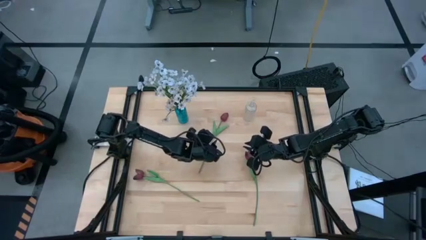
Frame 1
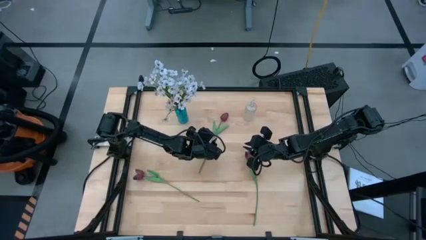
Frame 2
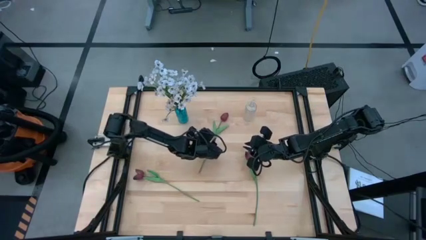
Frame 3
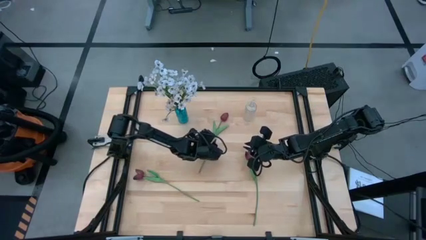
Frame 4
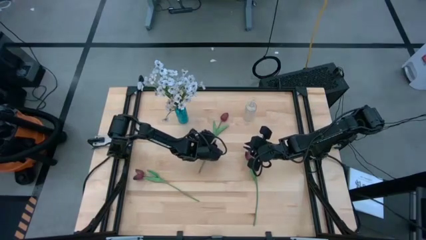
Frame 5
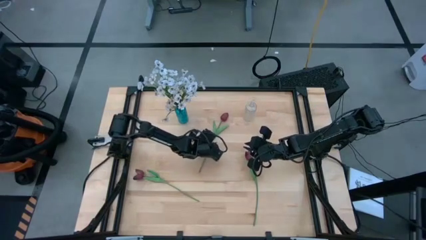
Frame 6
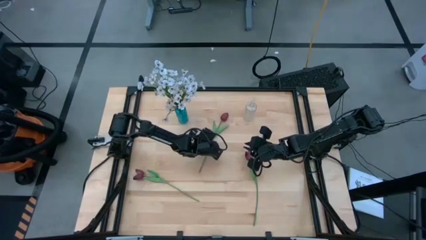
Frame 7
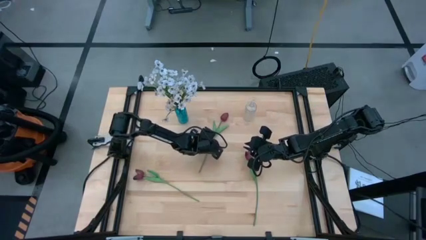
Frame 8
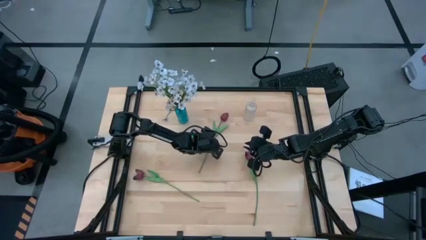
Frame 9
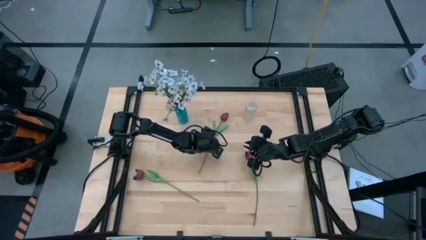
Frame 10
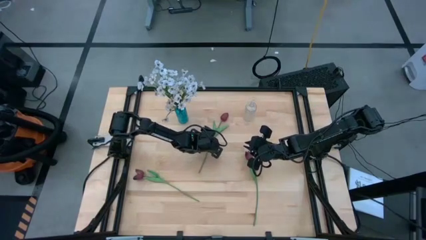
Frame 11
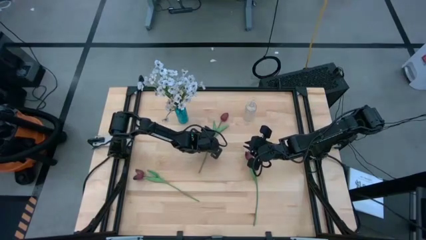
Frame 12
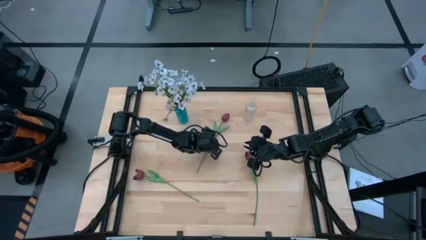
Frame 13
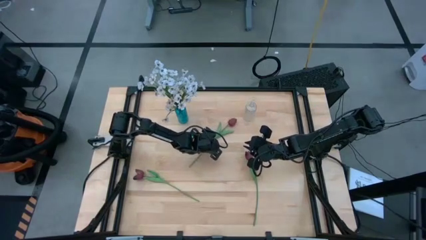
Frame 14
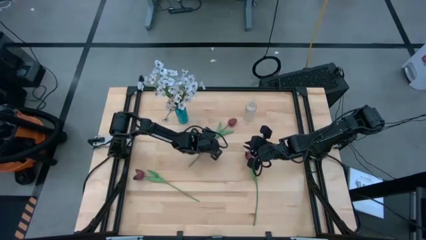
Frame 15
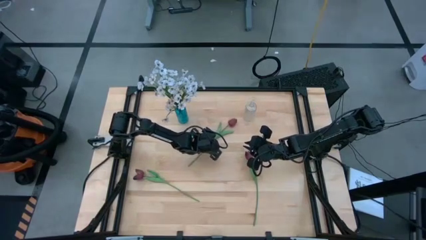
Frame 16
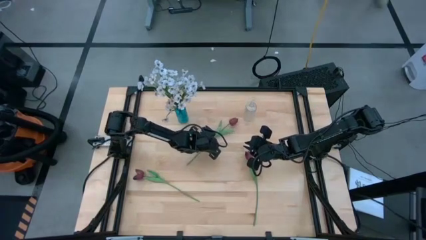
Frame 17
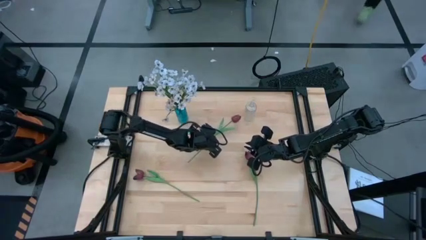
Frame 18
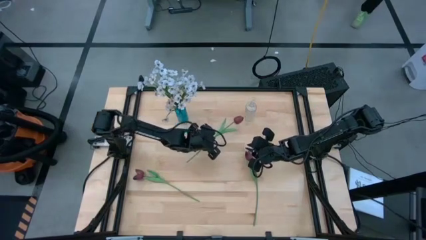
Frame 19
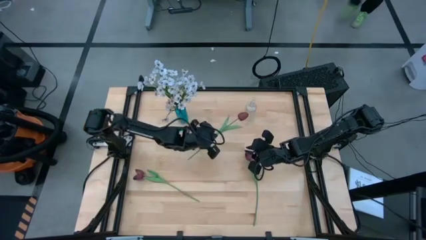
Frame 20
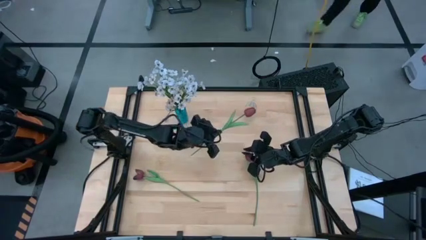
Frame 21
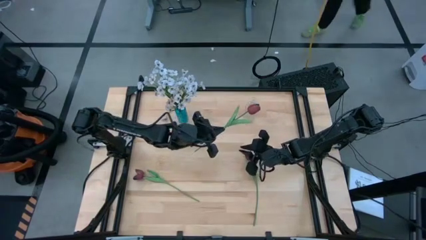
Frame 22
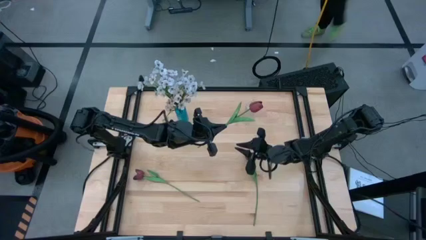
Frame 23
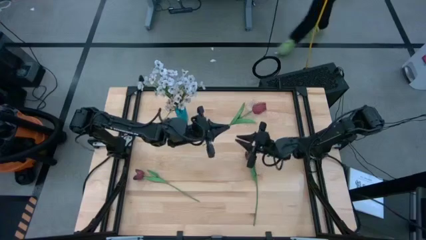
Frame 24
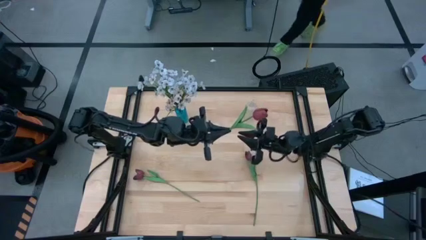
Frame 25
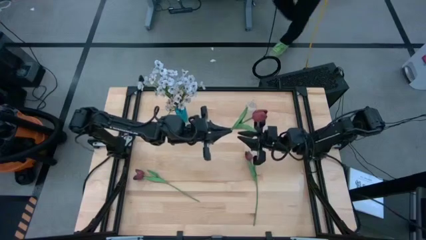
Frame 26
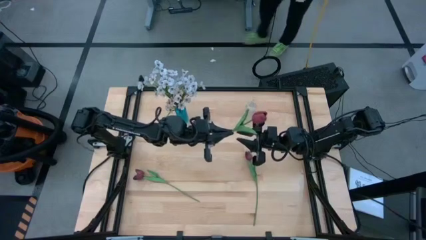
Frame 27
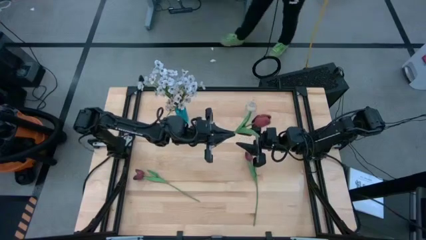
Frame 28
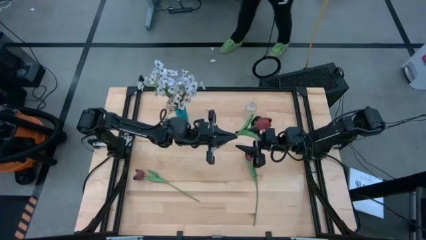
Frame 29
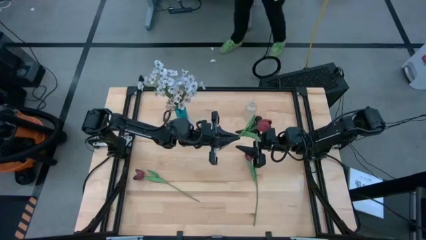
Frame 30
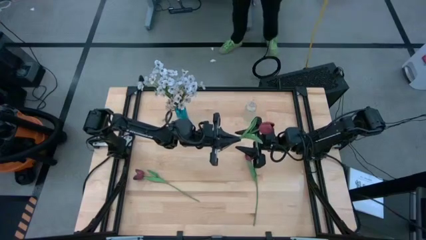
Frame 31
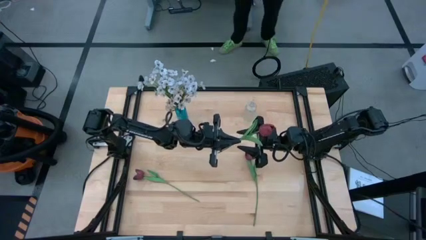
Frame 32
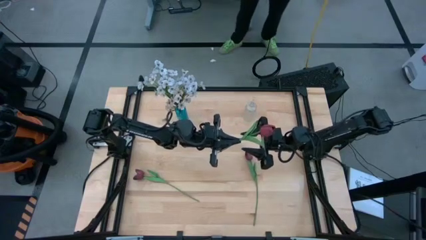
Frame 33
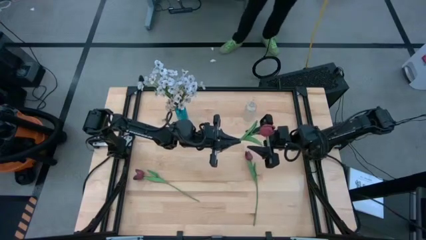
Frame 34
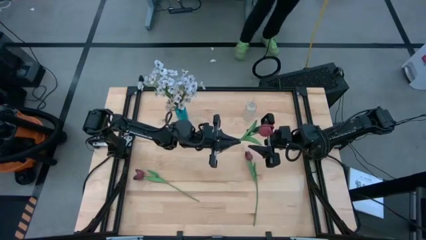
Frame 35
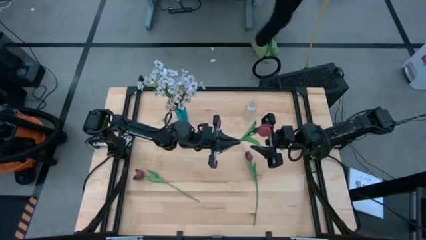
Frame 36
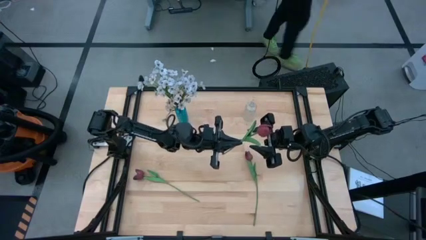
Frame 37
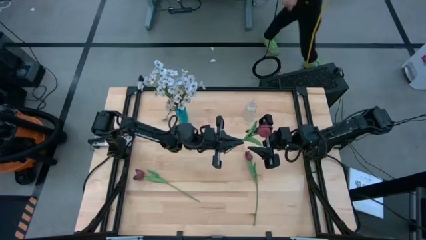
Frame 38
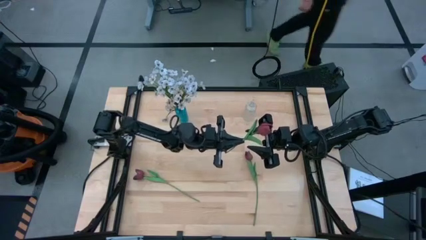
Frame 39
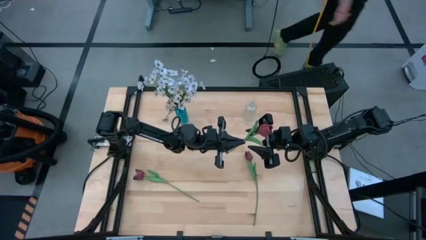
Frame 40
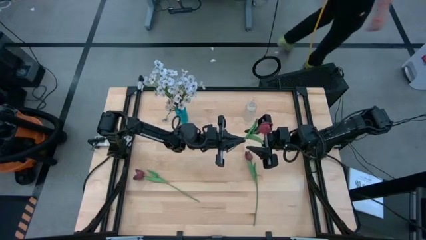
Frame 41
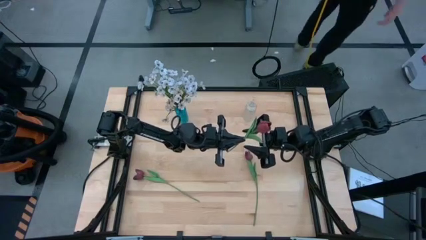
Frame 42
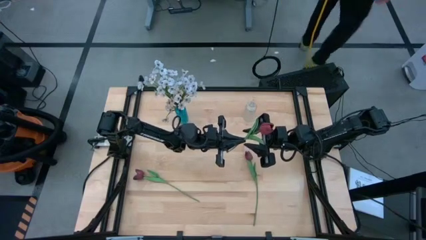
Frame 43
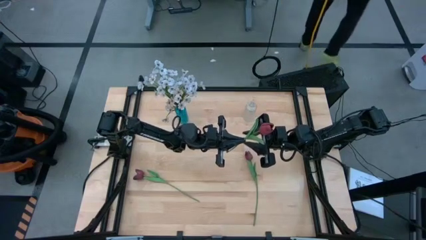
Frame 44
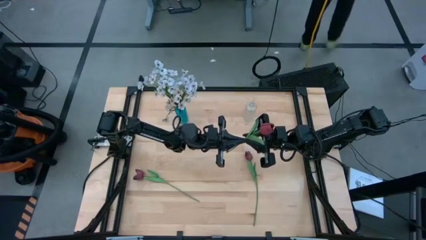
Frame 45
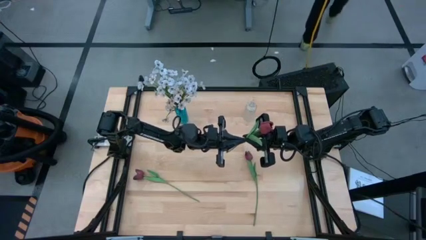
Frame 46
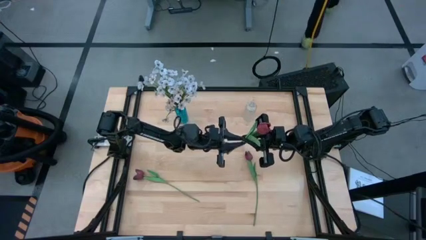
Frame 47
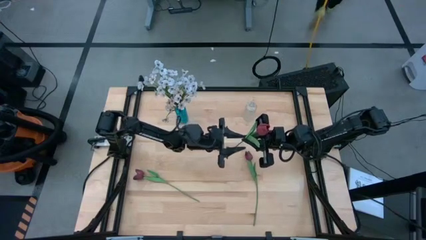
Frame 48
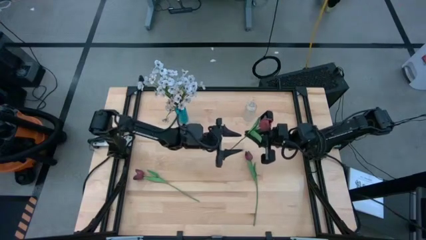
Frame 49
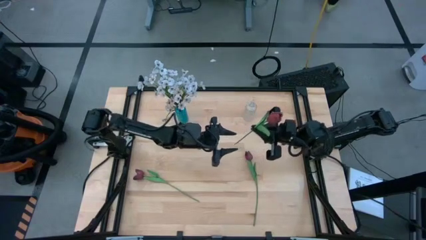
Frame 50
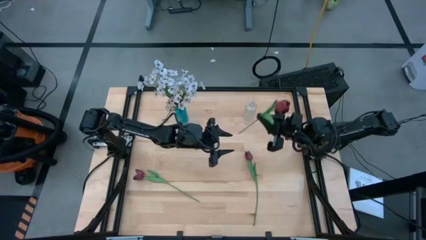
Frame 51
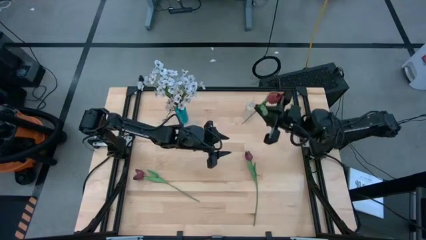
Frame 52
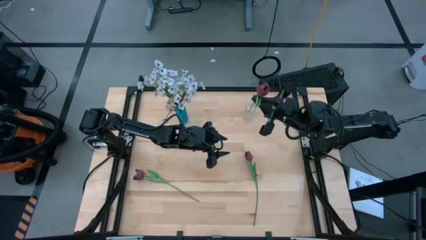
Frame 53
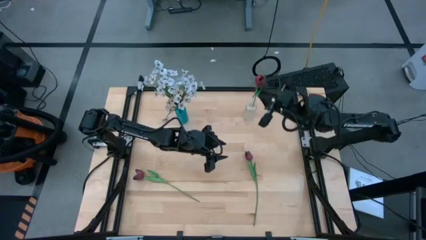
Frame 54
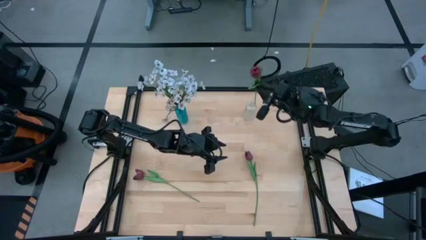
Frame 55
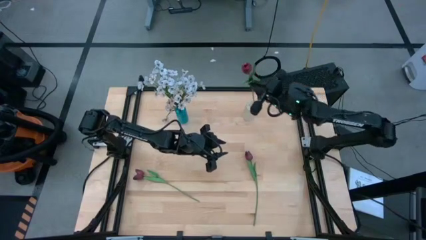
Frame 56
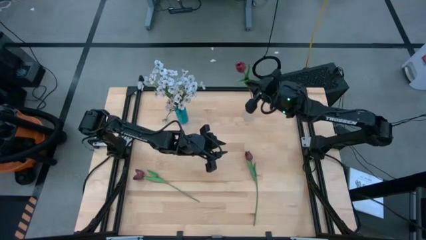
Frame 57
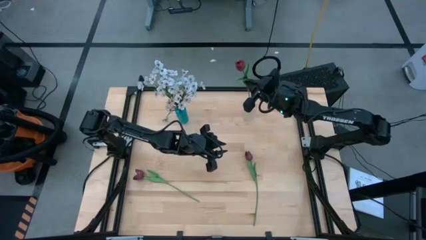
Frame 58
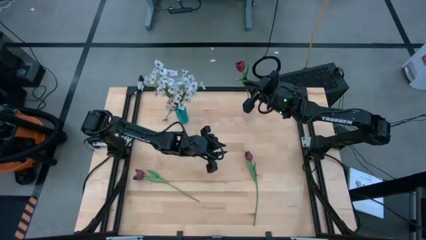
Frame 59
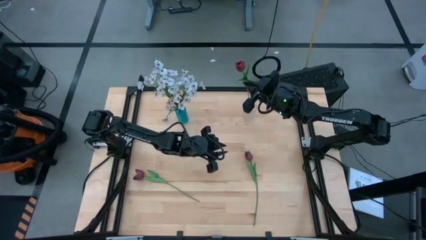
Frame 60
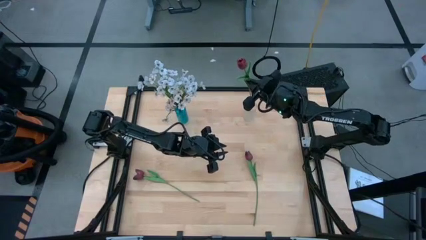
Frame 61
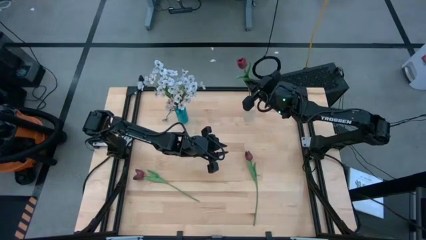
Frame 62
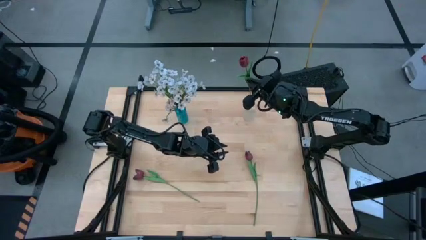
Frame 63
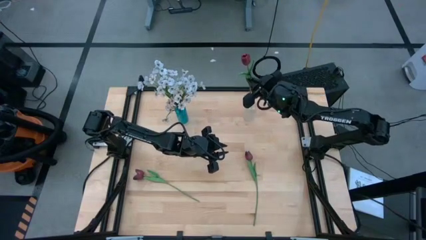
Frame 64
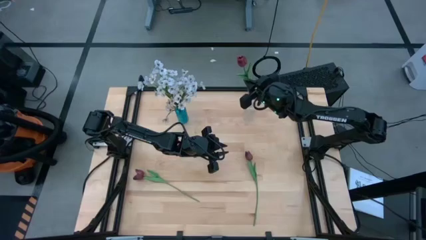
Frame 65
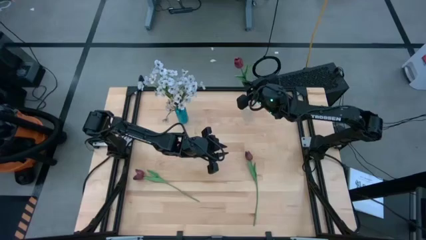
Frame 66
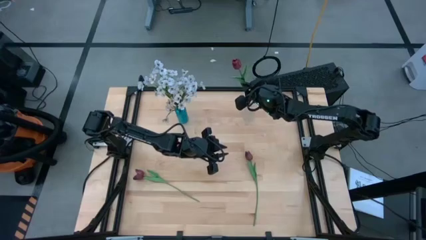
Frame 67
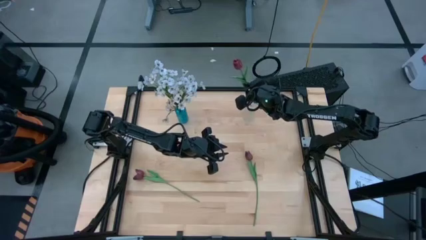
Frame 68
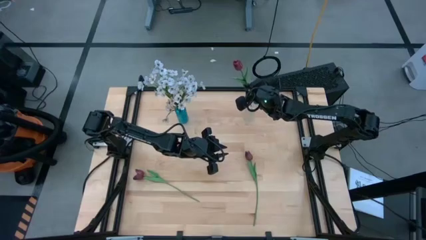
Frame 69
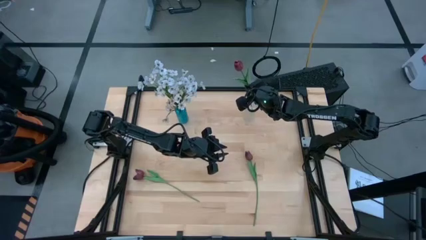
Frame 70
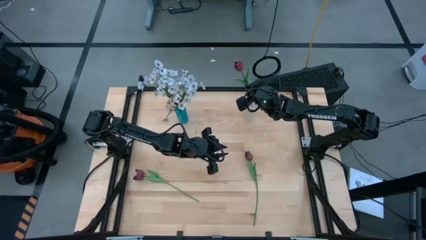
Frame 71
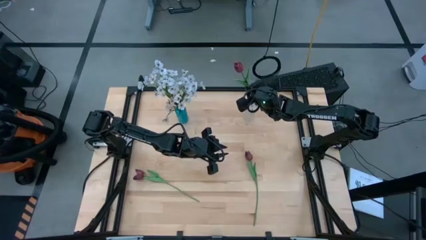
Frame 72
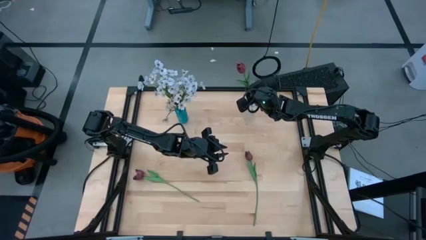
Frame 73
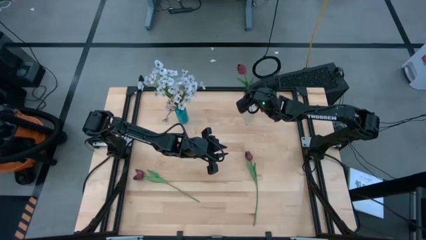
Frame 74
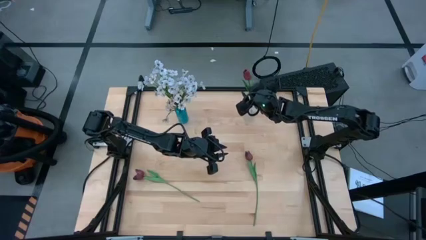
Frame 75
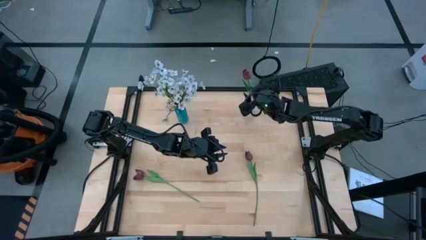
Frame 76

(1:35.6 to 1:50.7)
Task: Sort flowers into vase by color
Put the top red tulip into the transparent vase

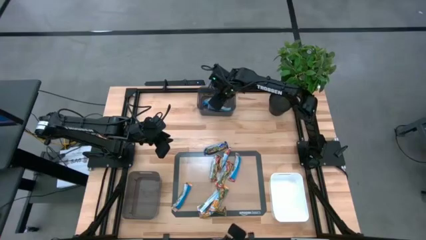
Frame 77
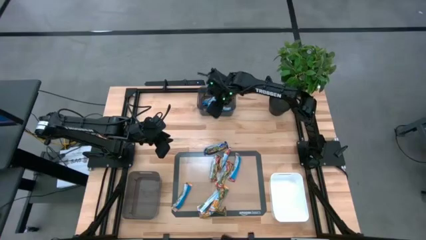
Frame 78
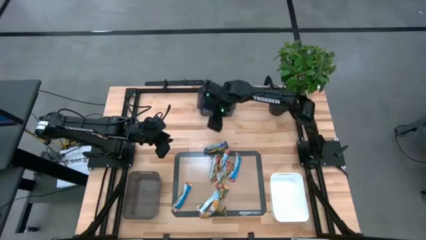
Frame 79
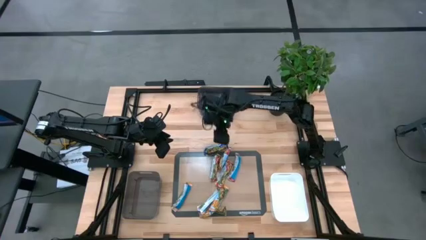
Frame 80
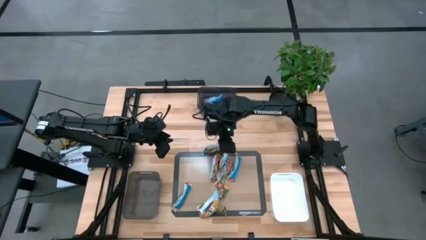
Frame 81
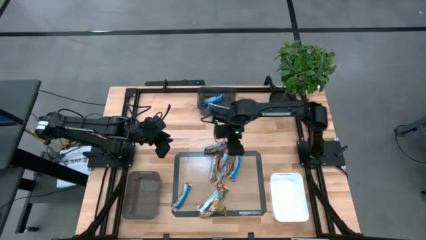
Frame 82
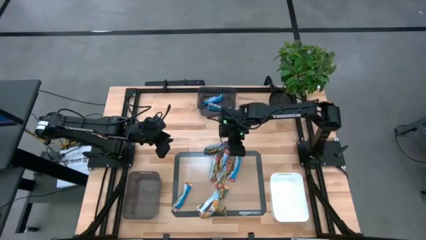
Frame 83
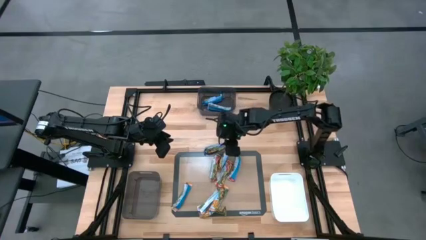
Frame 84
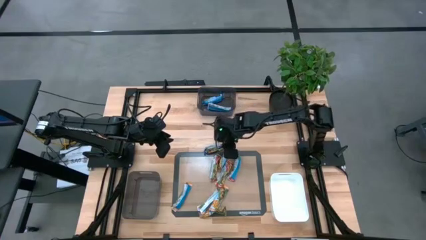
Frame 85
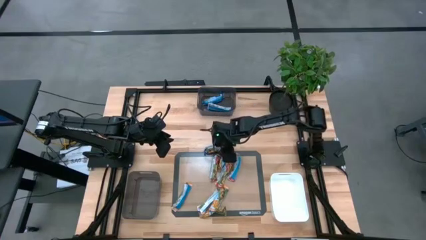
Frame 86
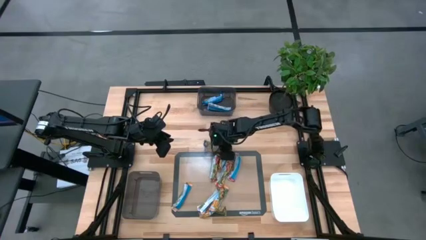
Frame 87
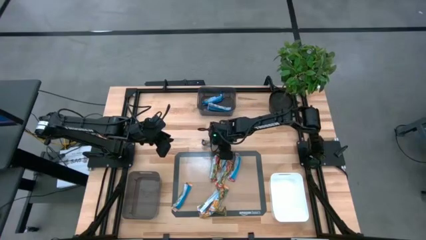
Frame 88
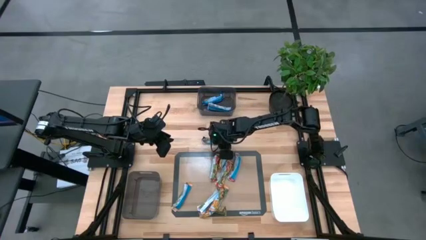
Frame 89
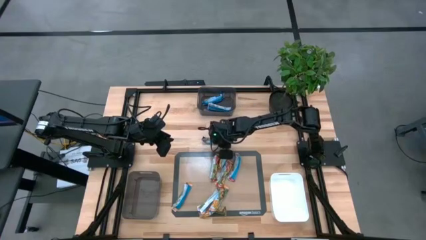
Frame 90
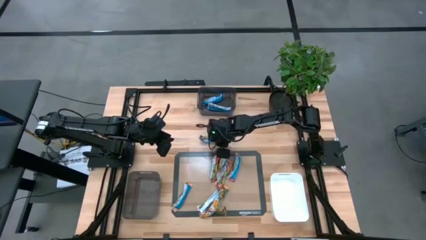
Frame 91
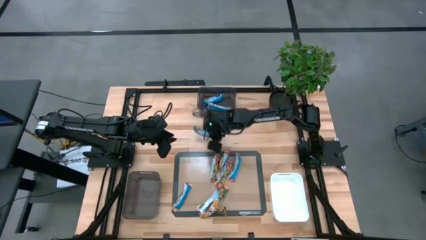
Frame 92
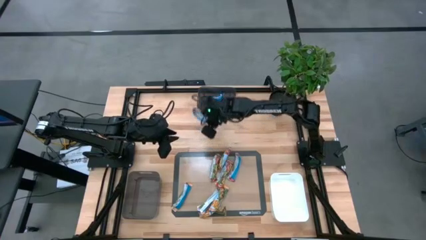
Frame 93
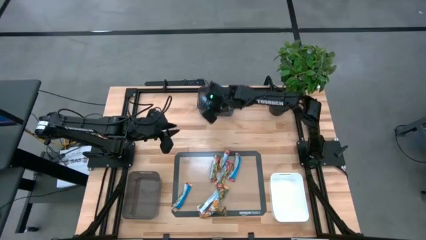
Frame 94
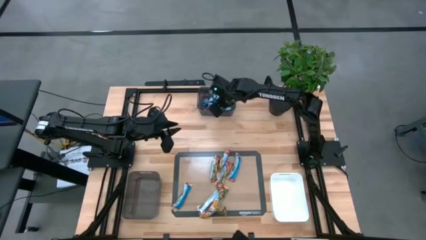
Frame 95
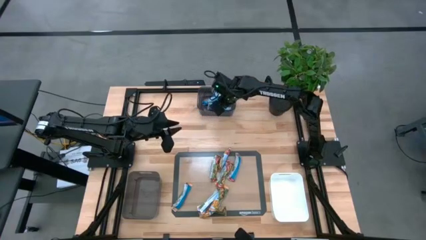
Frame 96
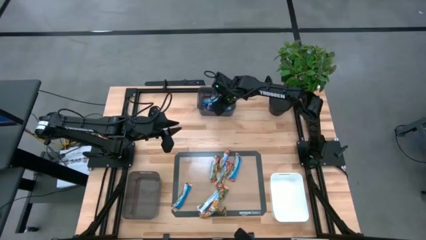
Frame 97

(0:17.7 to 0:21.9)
Task: Pick and place Granola Bars by type
Put the blue granola bar into the top black bin
